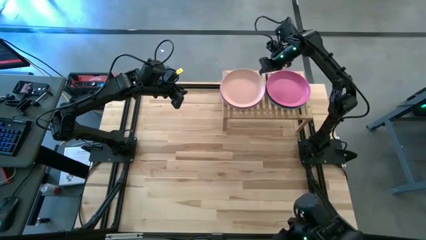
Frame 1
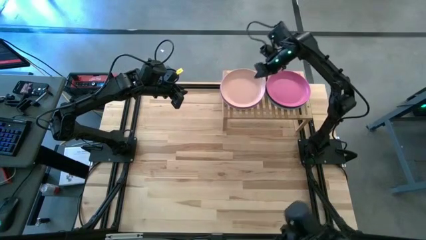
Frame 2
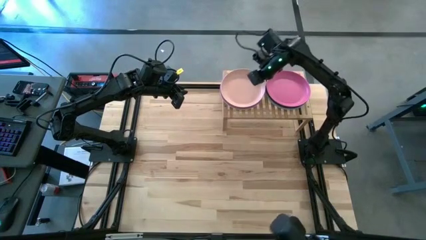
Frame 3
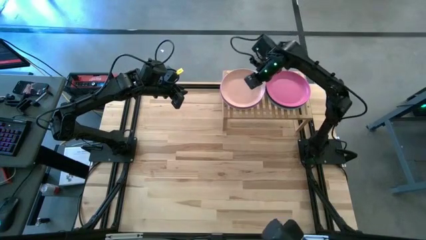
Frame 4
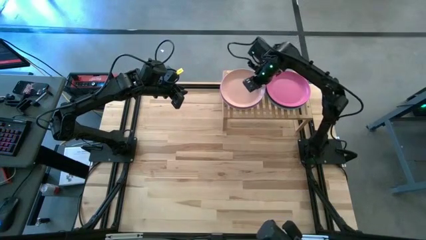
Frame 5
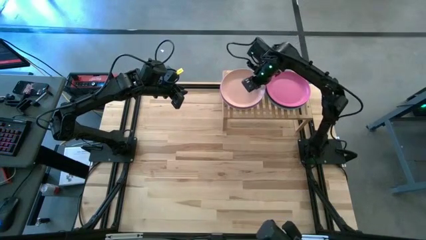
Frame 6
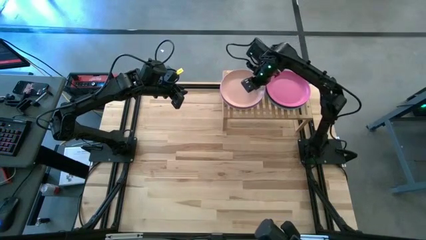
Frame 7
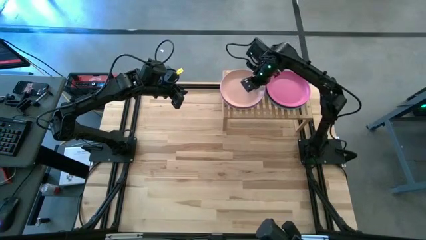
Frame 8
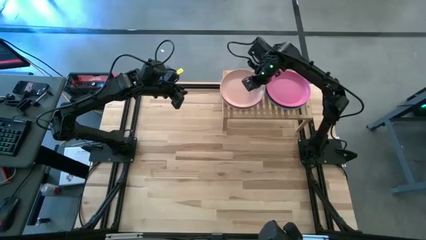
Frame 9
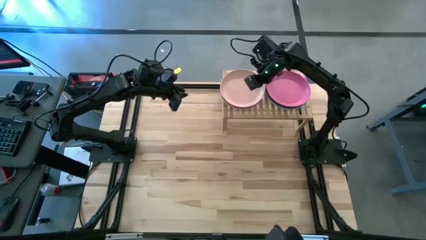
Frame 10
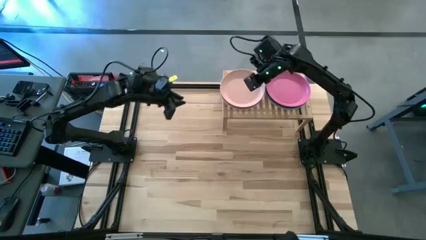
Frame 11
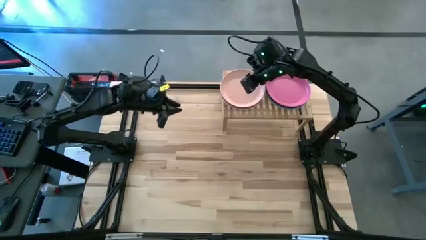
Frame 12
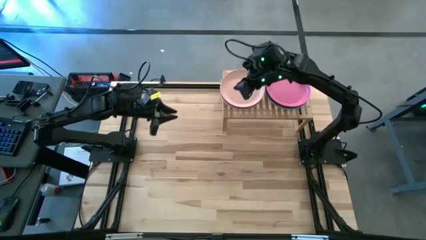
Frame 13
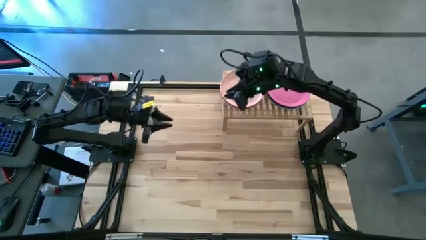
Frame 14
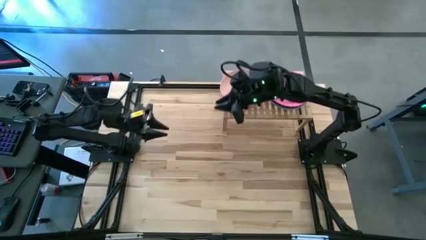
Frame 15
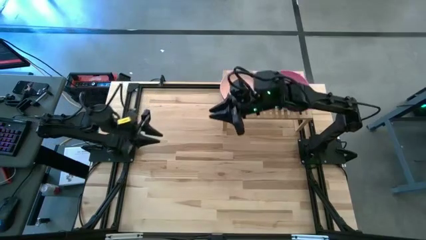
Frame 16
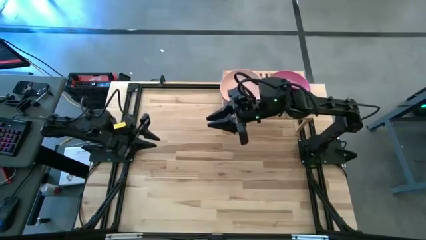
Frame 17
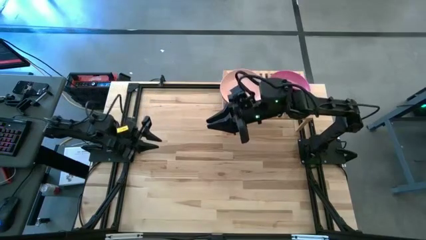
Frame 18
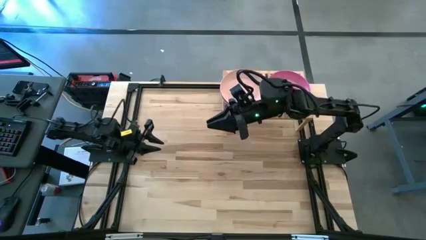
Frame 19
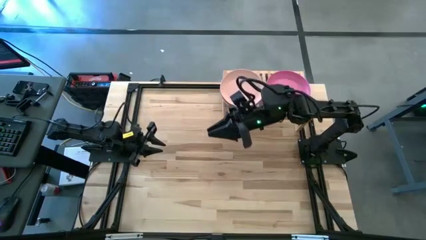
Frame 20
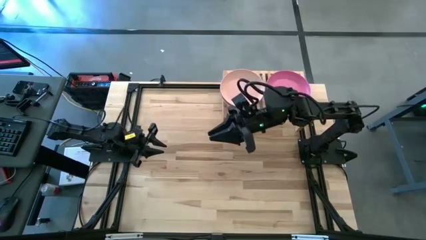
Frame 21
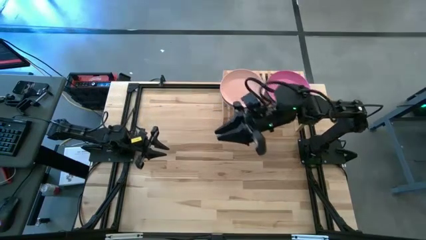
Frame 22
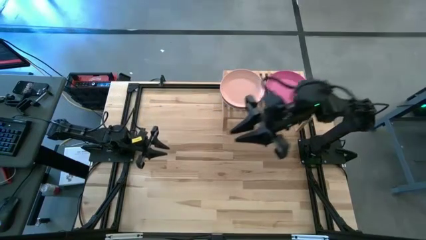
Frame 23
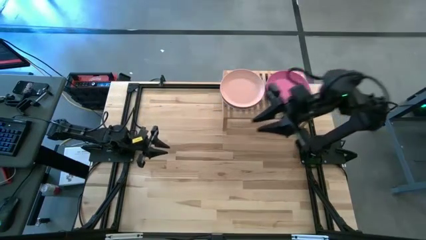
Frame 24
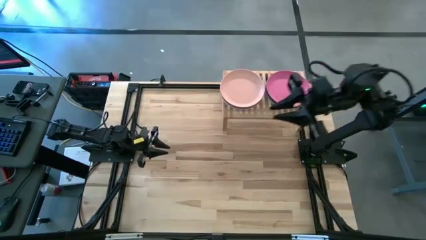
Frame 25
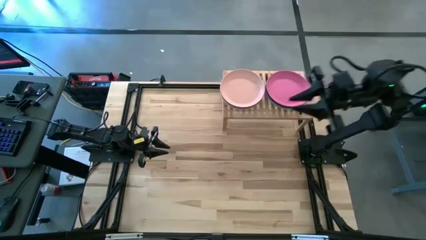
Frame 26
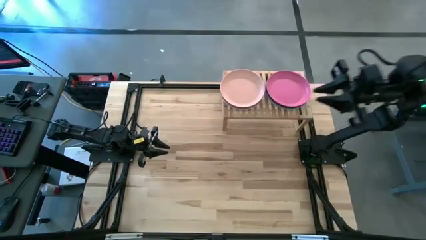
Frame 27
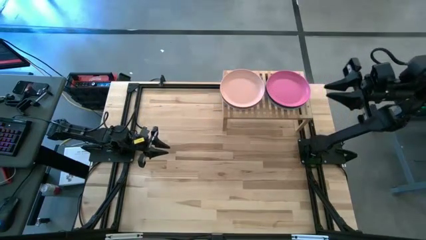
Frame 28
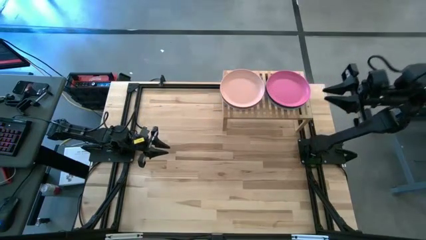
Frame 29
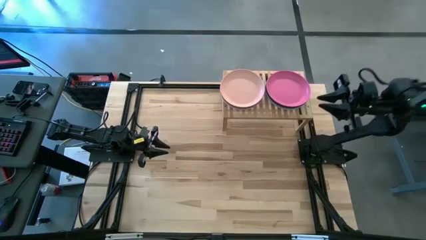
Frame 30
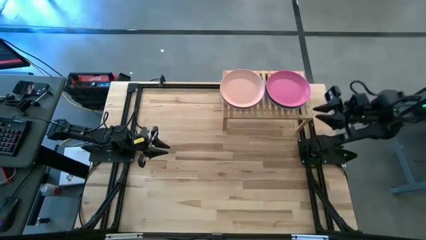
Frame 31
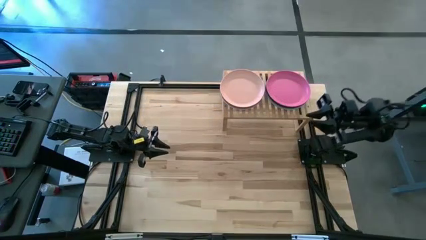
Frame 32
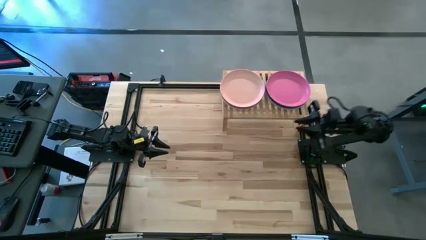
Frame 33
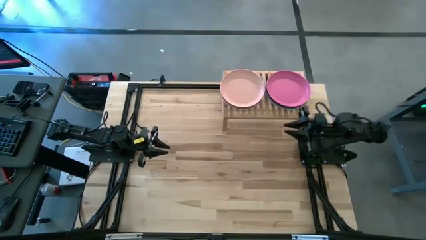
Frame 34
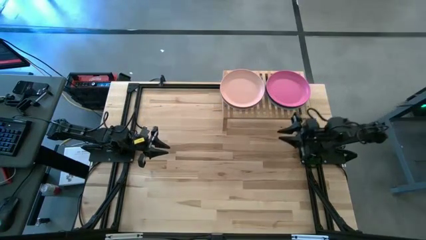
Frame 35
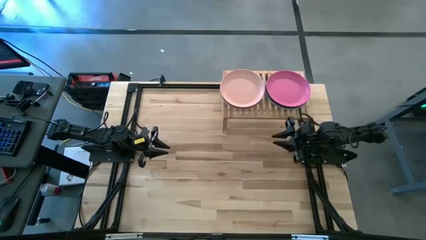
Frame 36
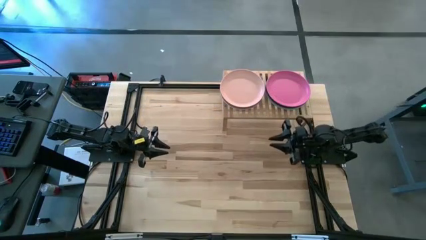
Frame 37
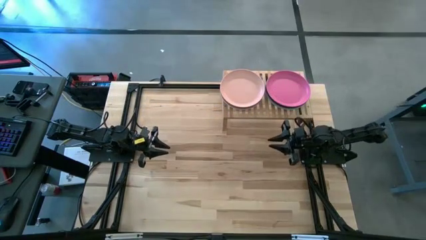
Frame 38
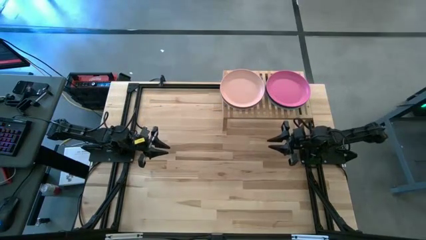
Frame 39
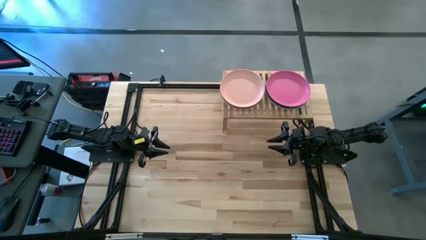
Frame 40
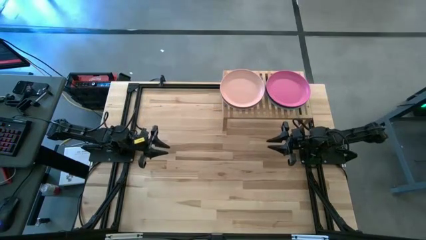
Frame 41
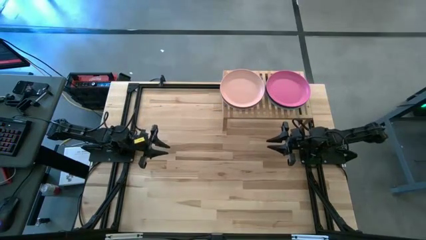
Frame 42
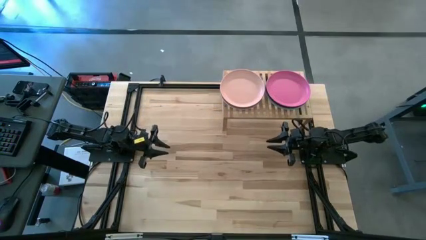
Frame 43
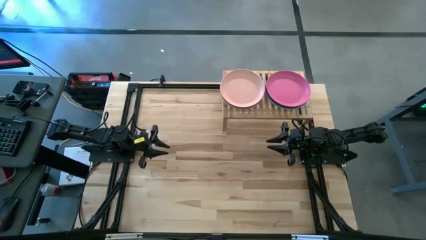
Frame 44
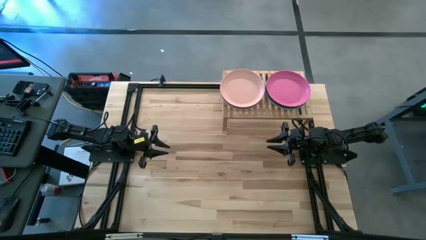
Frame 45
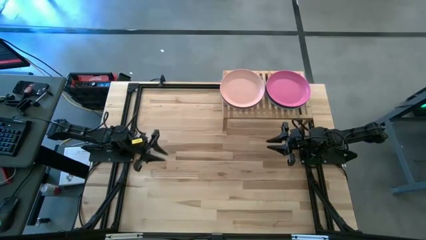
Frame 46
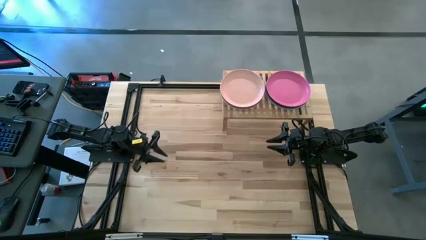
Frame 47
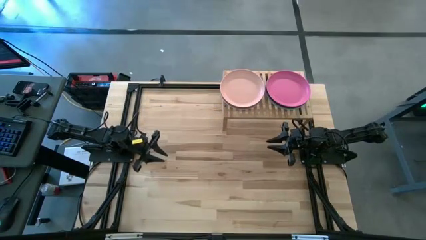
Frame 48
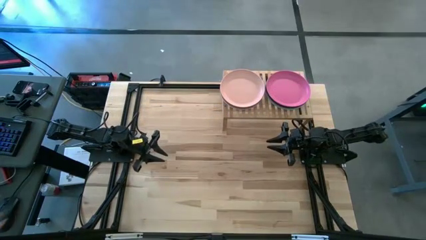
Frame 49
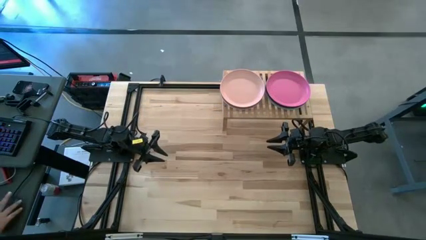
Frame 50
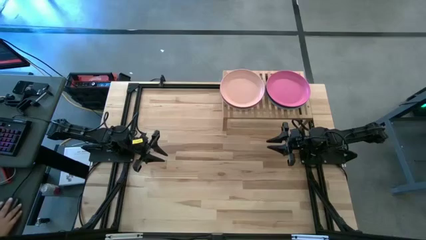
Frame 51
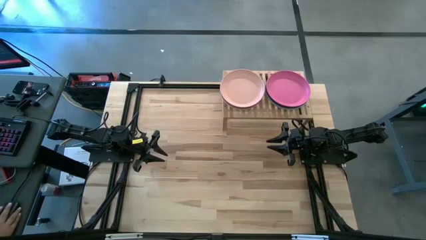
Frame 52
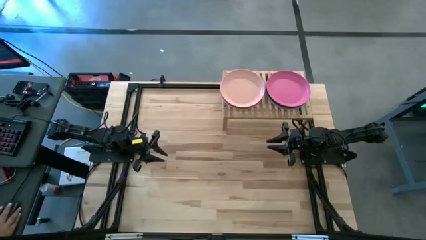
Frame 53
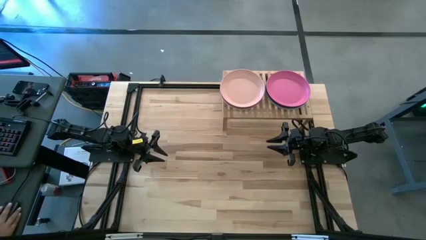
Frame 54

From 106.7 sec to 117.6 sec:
Task: Place and stack plates onto a shelf
Return to Home Position

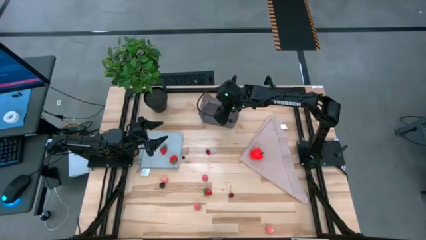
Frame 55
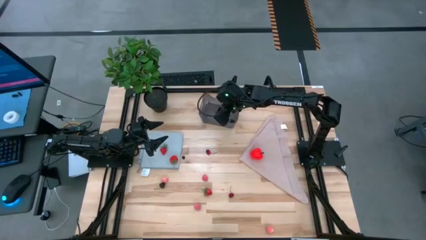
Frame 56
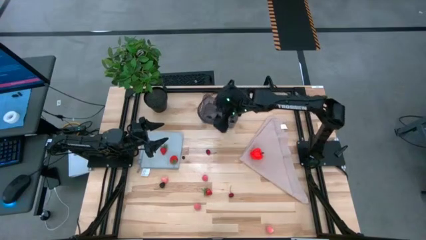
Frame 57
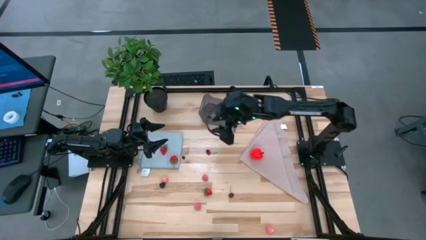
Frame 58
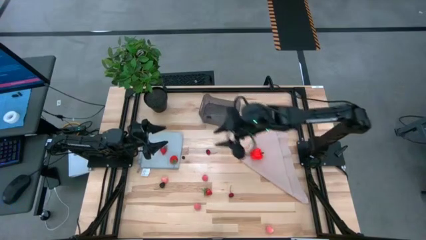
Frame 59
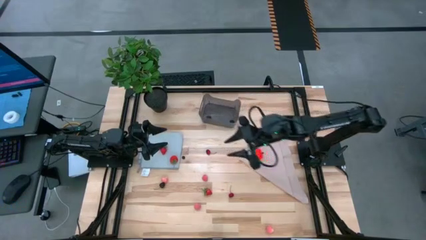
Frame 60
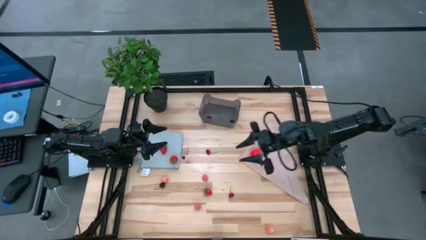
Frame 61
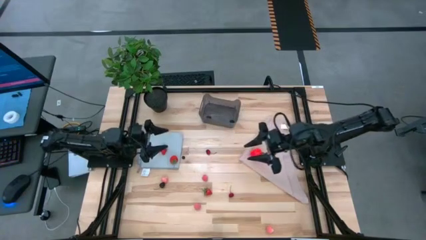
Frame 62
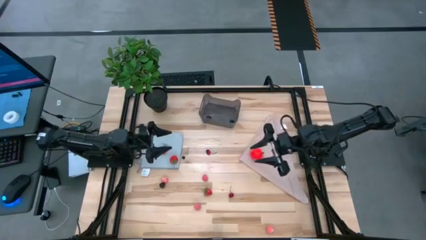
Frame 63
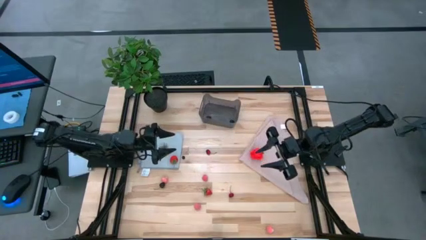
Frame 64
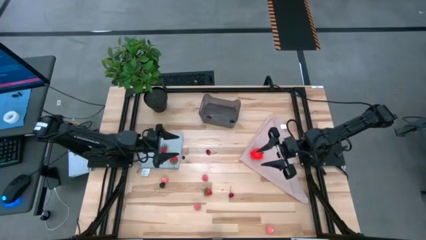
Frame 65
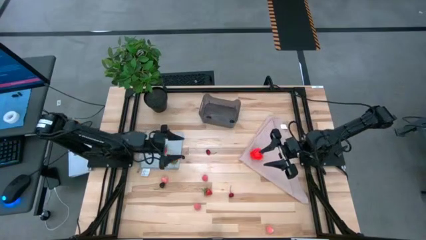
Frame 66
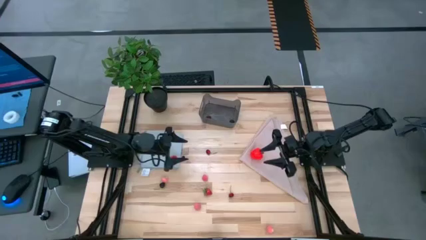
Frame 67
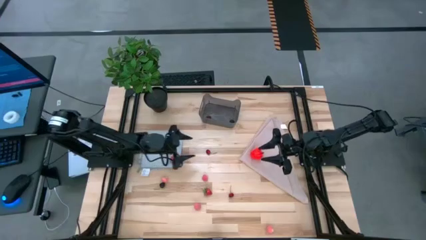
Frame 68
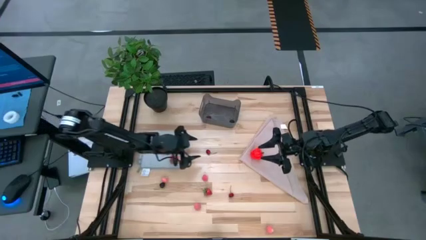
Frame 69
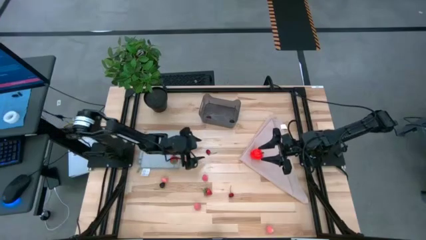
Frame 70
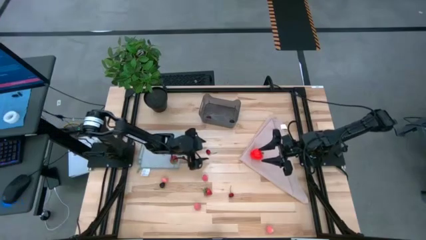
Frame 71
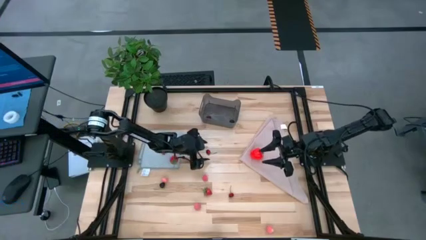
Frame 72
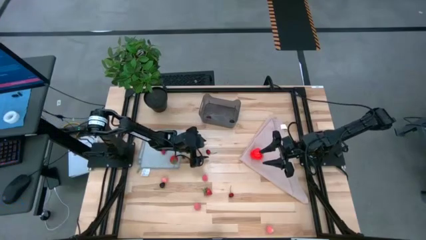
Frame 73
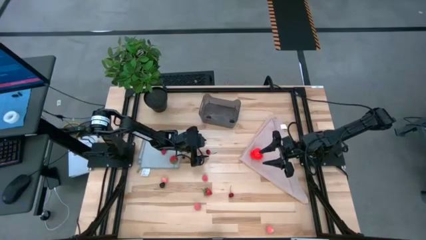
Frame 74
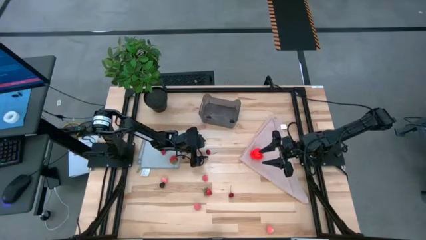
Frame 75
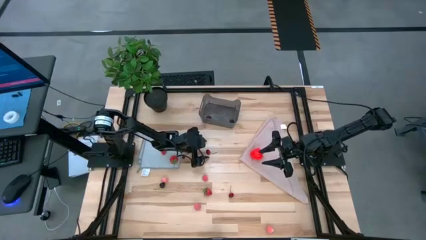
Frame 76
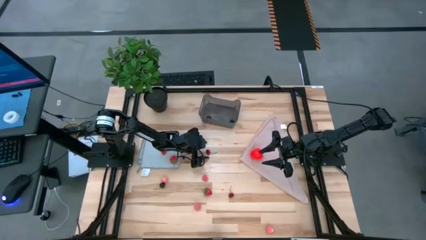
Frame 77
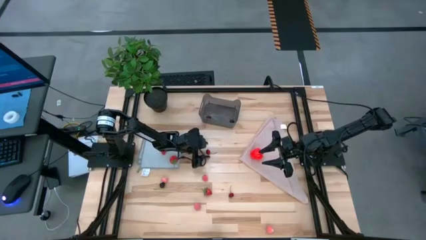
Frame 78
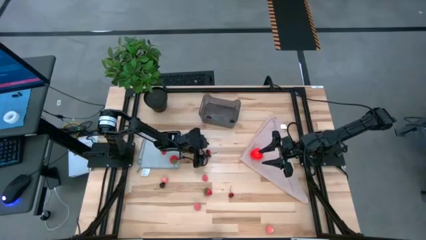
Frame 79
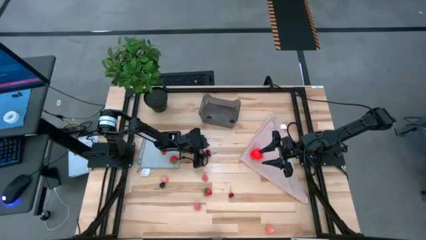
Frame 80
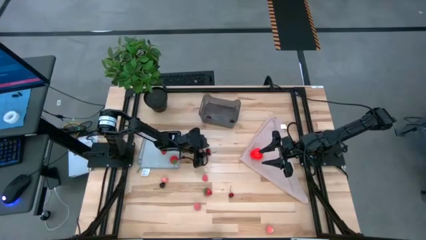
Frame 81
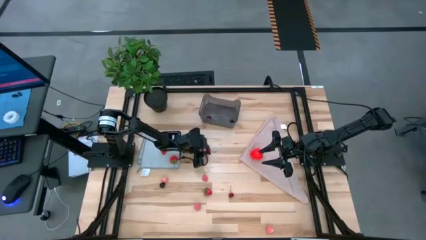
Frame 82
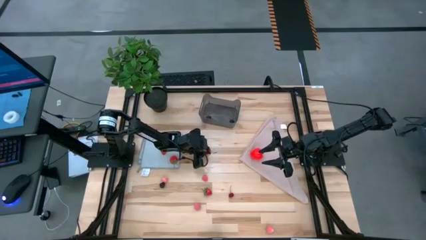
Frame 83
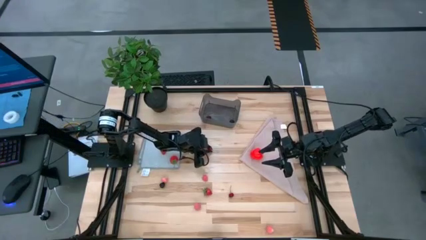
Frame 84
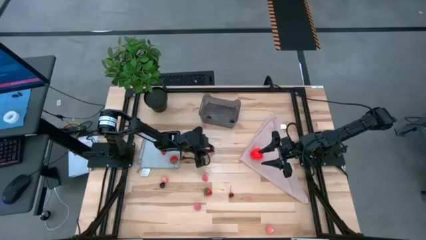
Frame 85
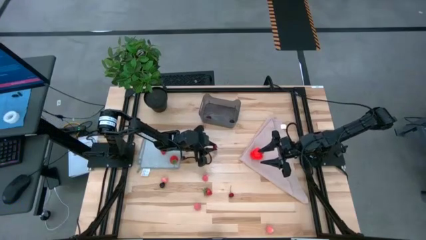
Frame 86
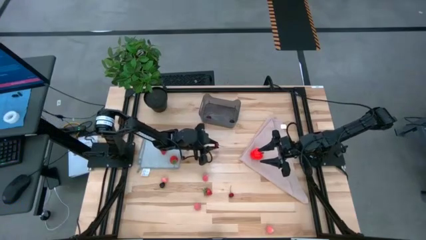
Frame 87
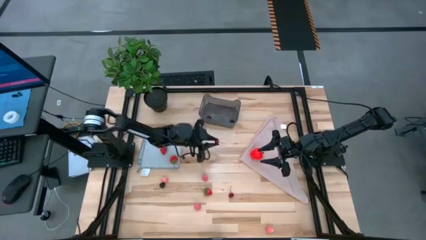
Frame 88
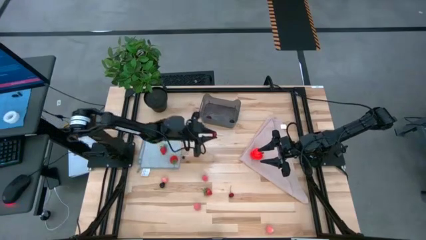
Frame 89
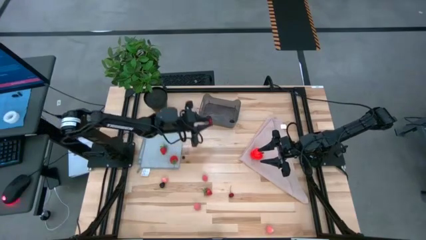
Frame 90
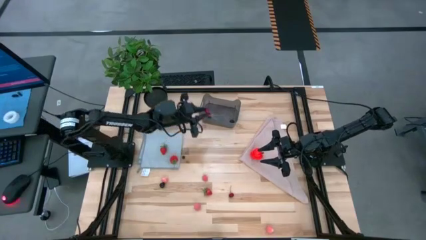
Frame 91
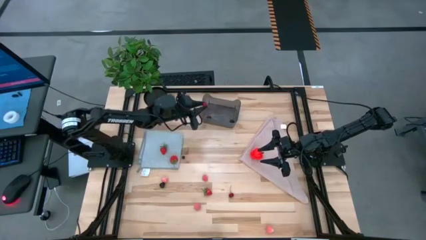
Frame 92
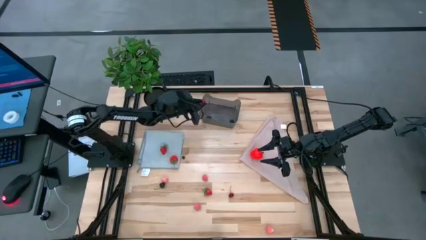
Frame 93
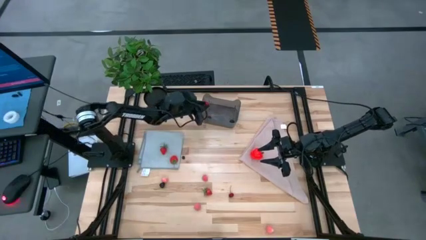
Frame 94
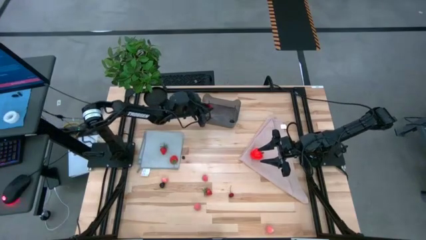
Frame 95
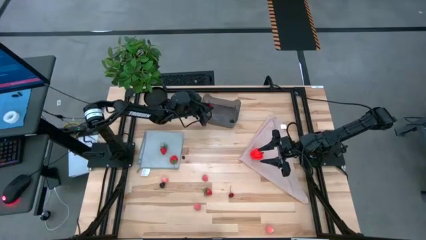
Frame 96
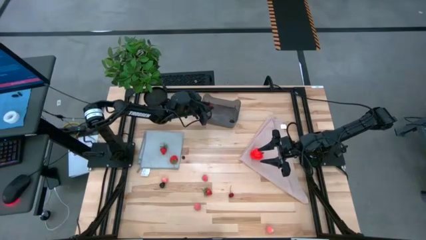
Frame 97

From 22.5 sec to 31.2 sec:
Task: Pick and placing Produce into tupperware
Put the red cherry into the black bin
